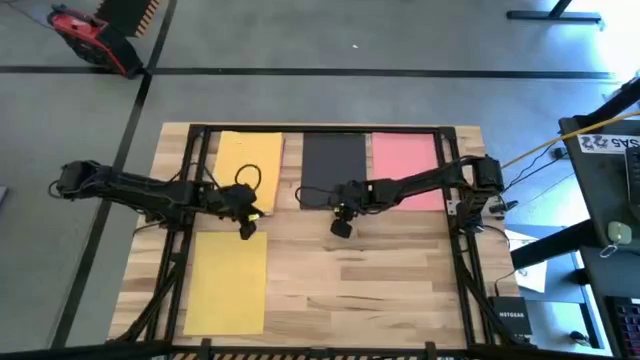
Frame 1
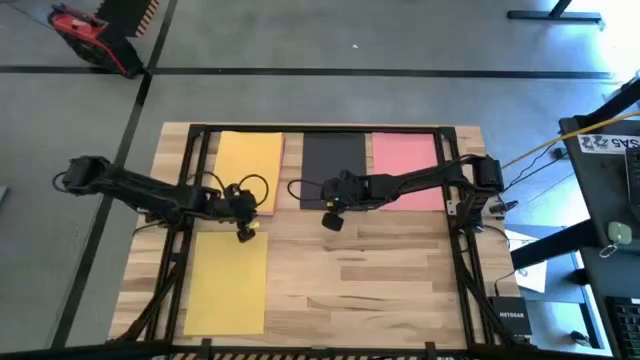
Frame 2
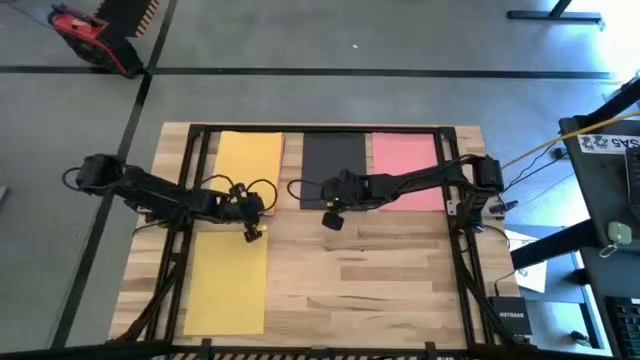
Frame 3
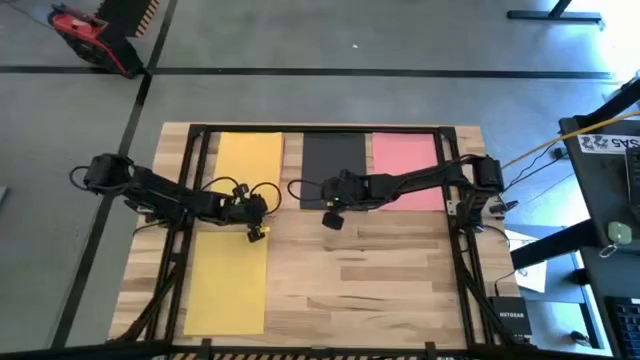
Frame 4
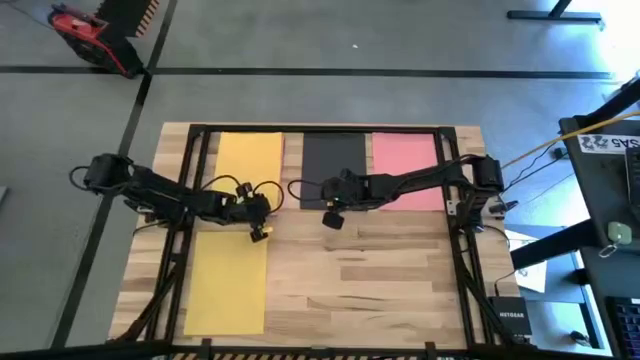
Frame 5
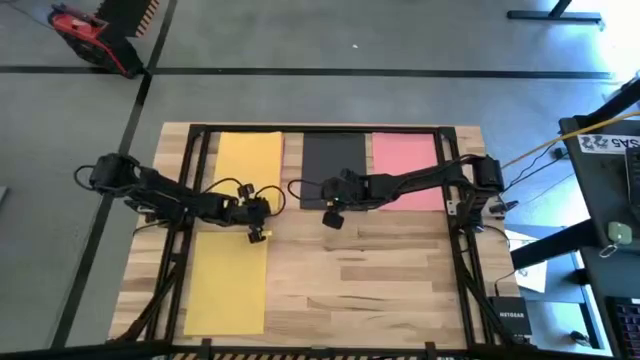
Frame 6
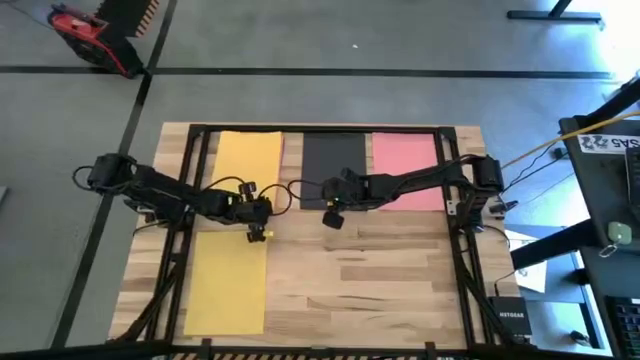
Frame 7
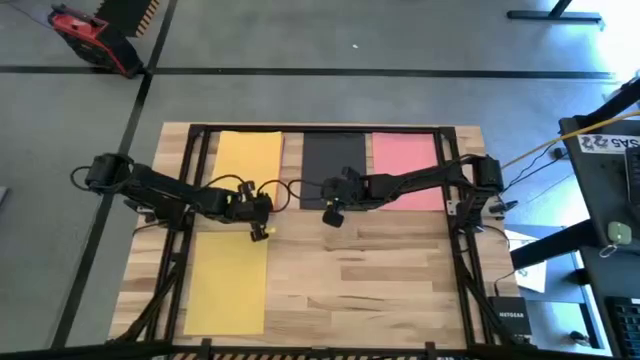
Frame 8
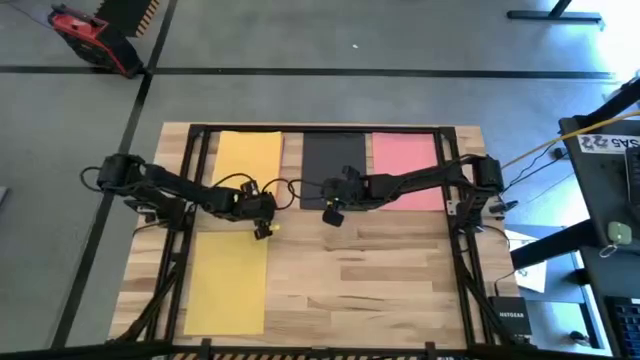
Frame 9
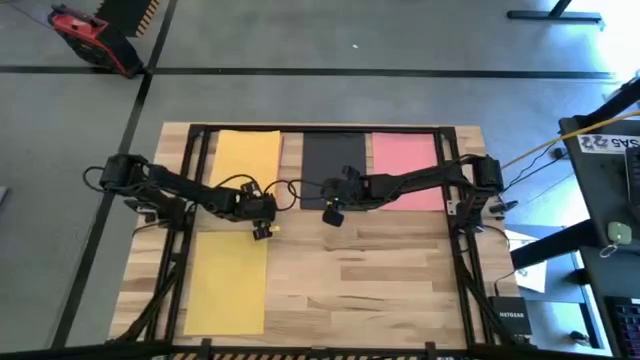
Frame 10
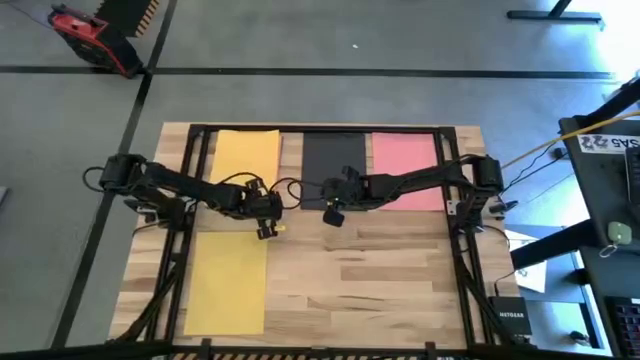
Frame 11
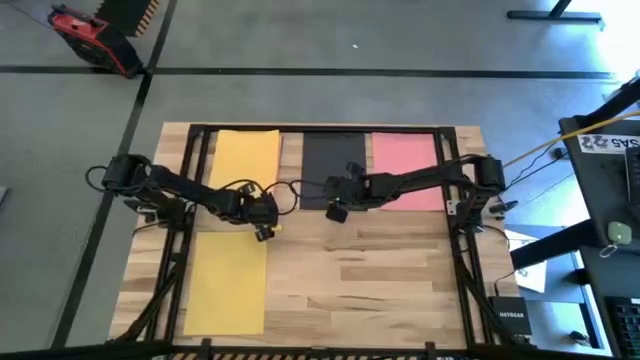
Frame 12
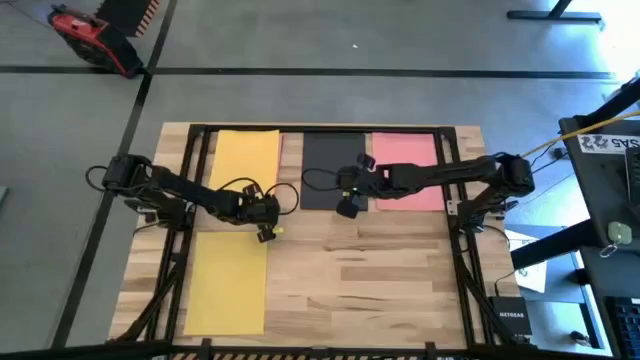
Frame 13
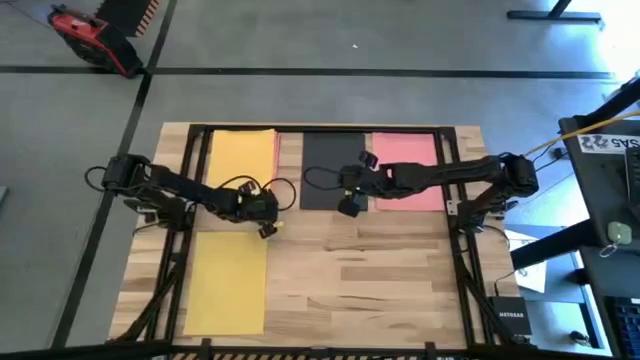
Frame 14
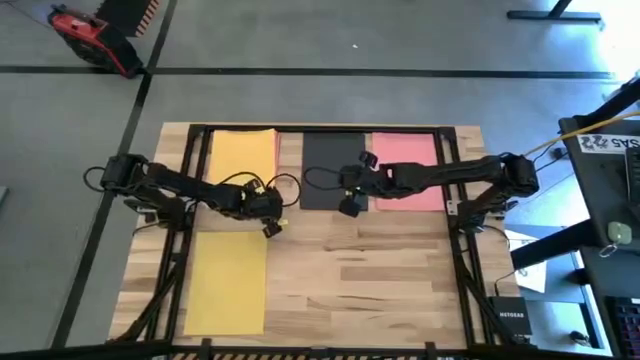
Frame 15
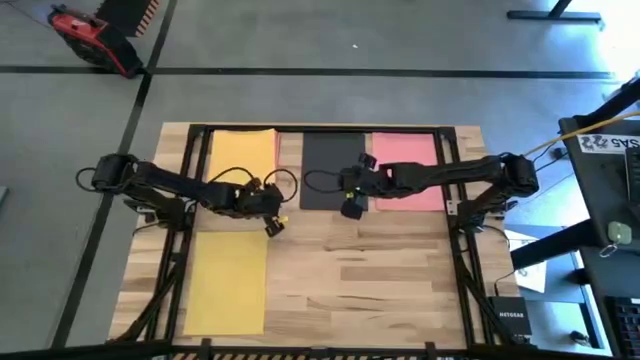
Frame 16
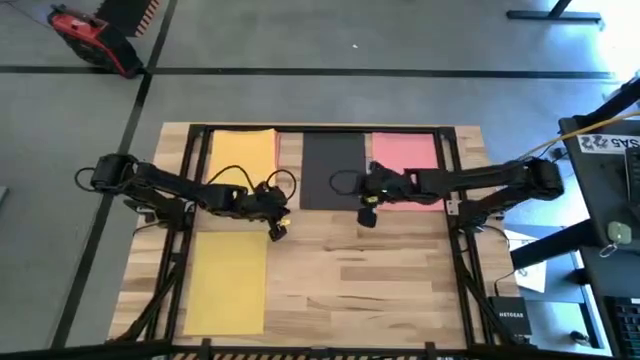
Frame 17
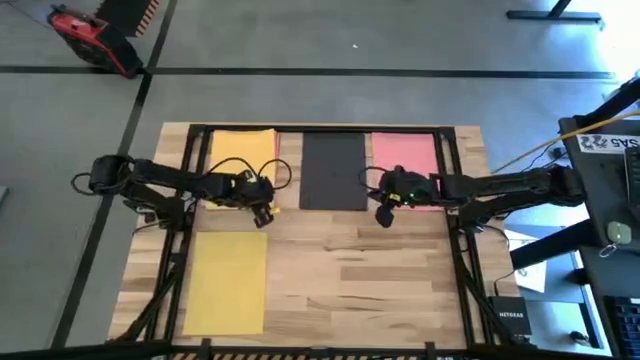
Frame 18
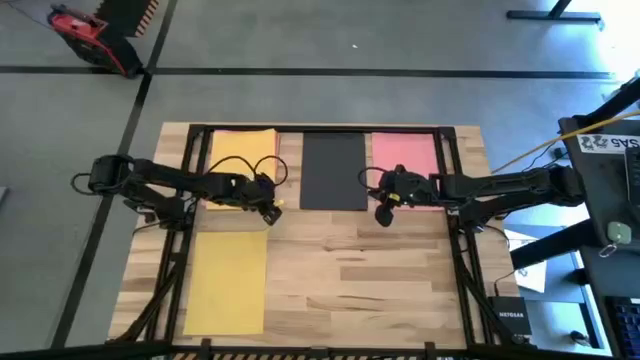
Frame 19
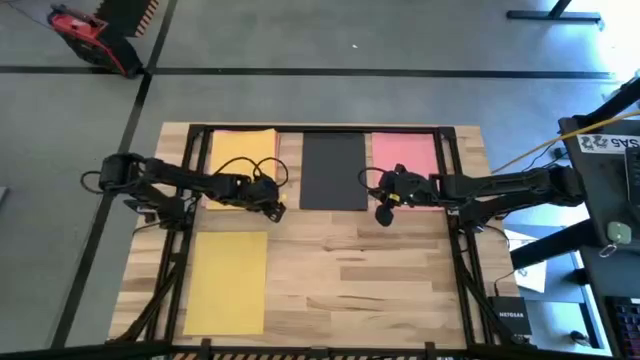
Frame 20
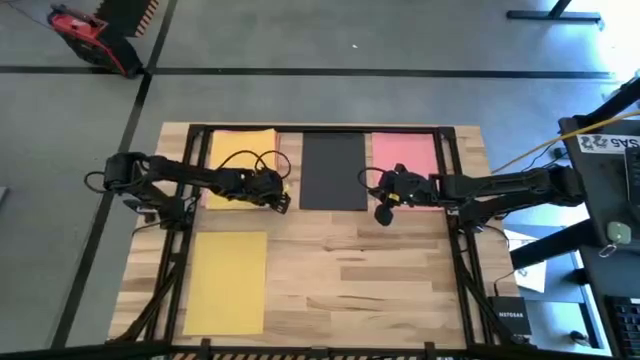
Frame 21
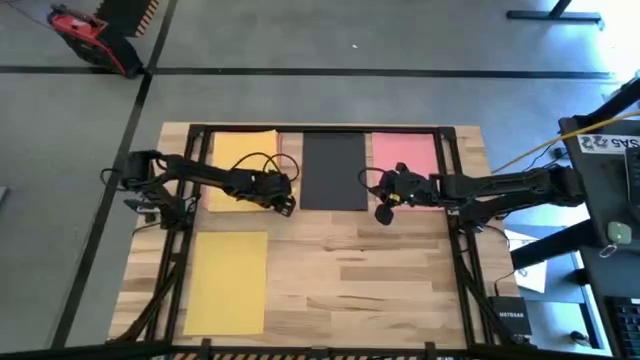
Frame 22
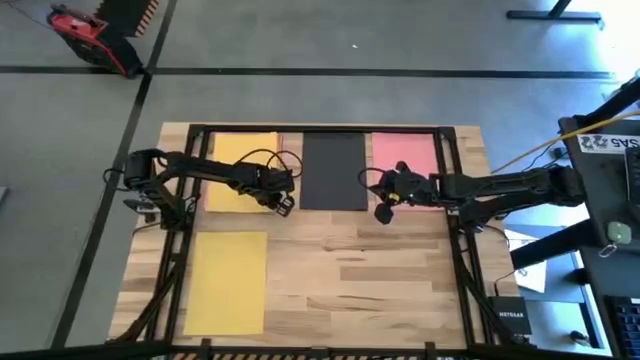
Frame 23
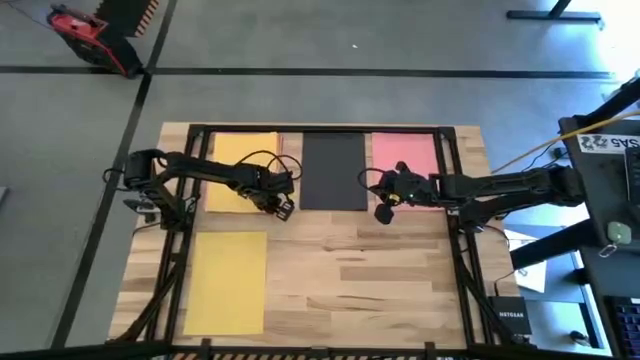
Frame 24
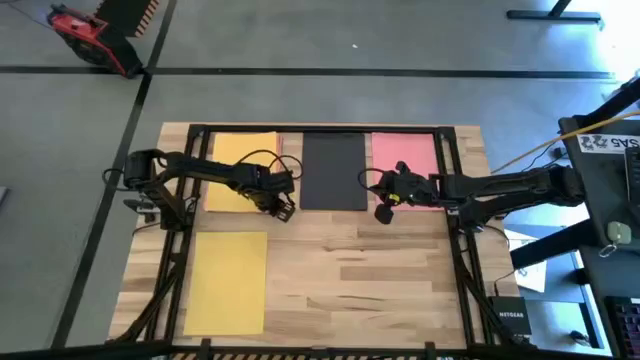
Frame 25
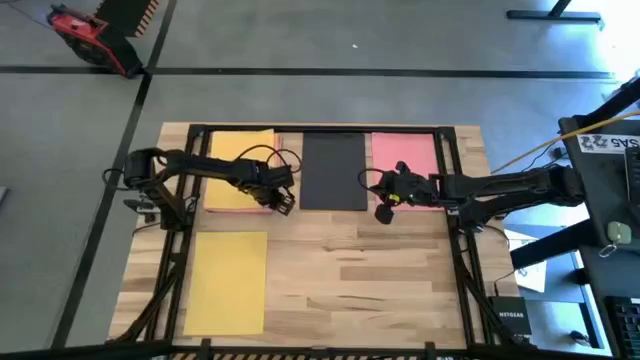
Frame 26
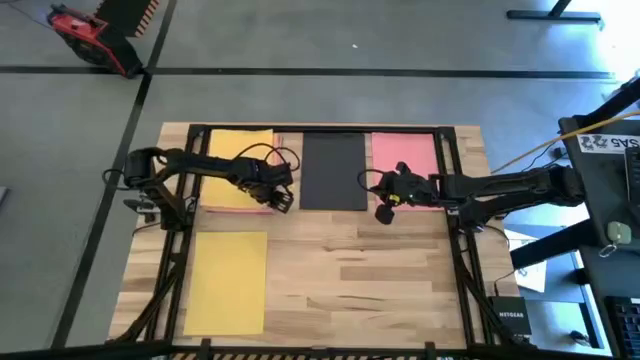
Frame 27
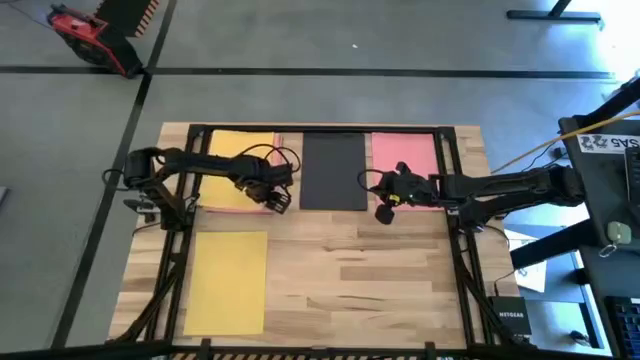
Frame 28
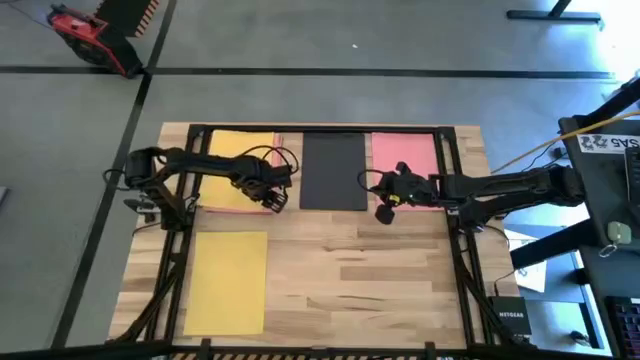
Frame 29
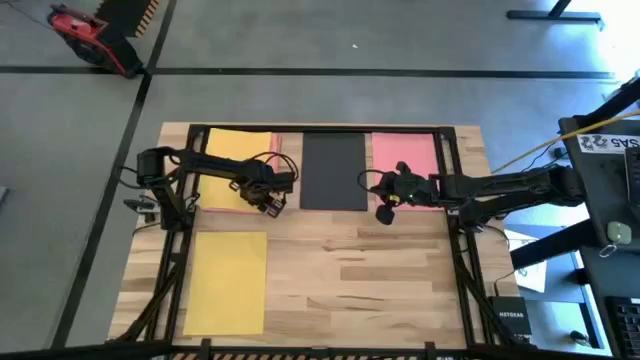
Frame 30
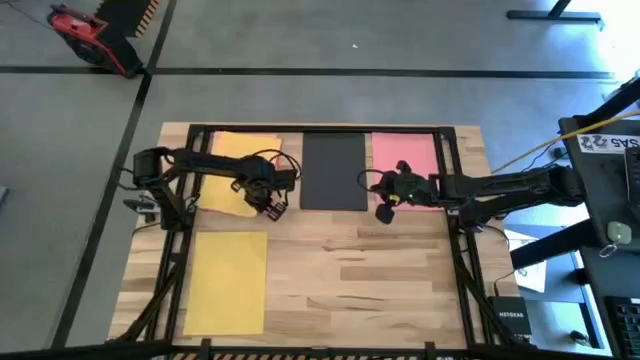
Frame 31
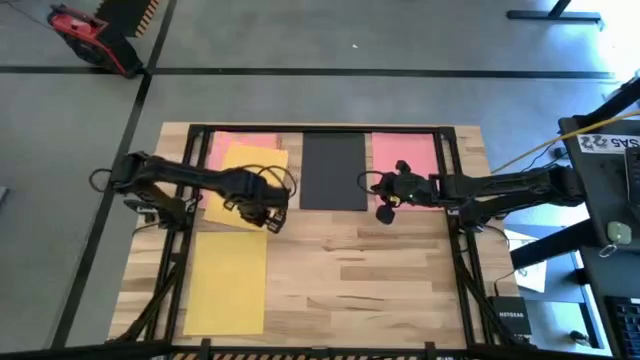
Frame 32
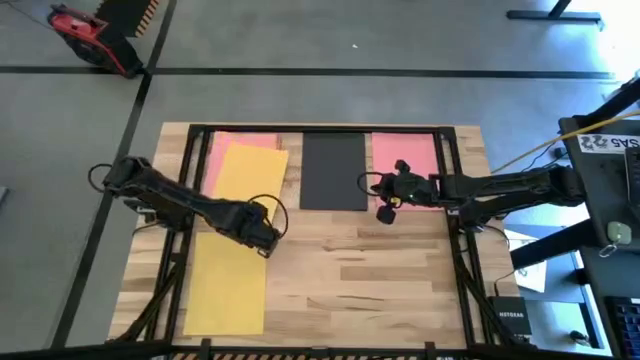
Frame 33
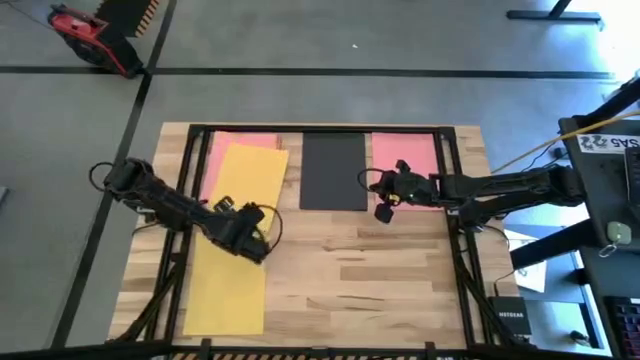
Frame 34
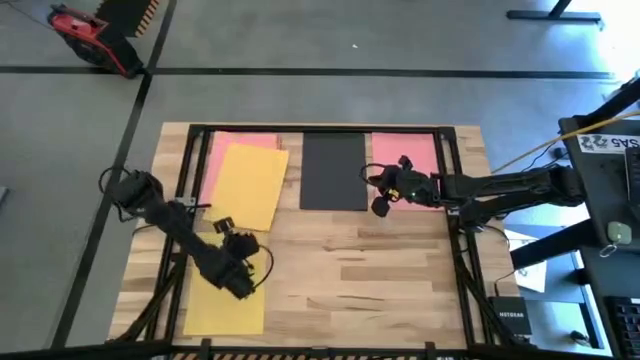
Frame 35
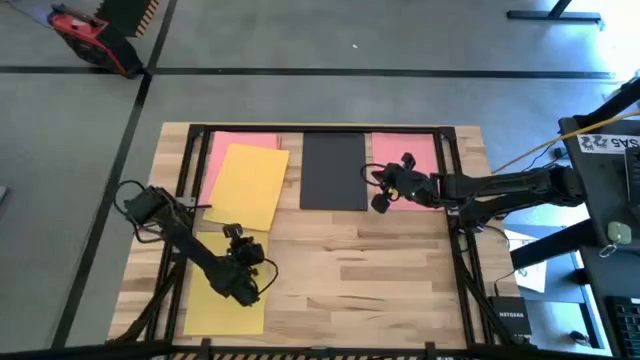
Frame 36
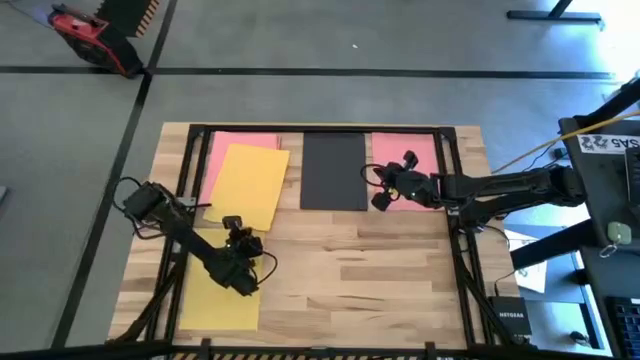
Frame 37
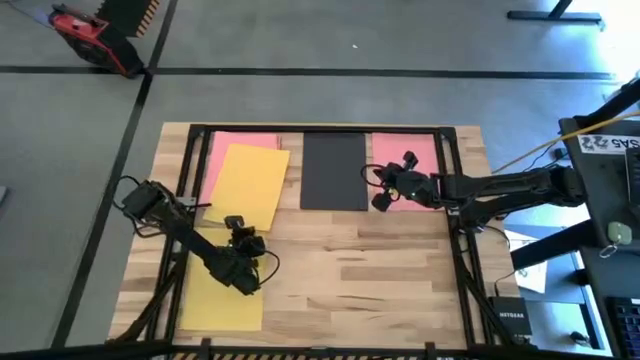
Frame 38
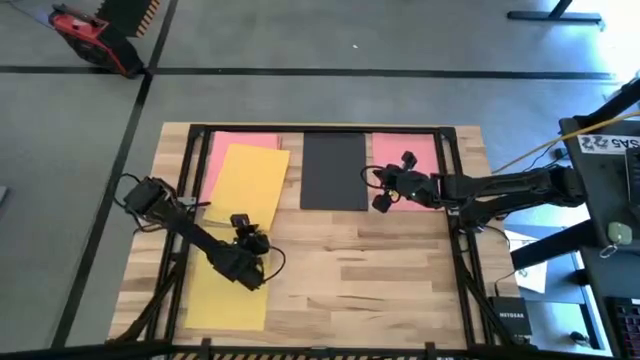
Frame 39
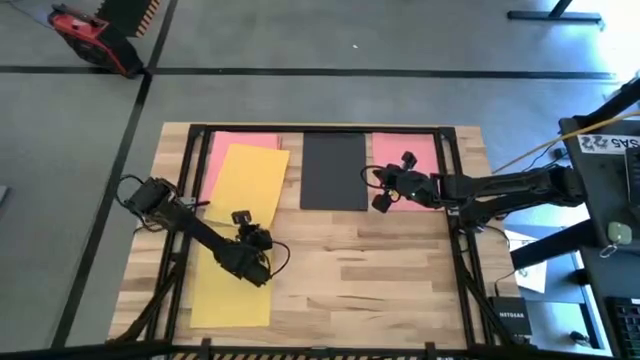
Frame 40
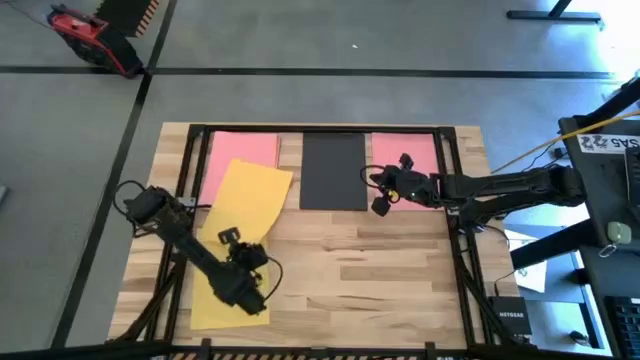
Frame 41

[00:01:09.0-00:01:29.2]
Task: Organize paper
Stack the yellow paper on top of the other yellow paper

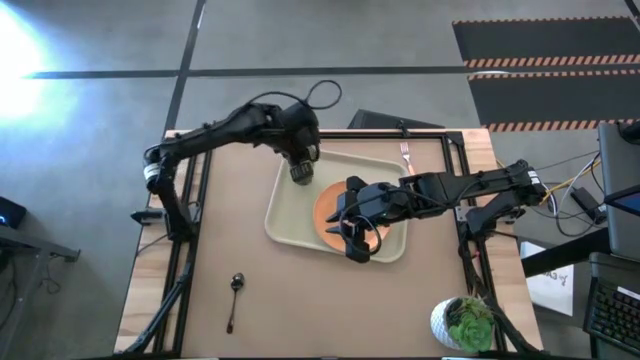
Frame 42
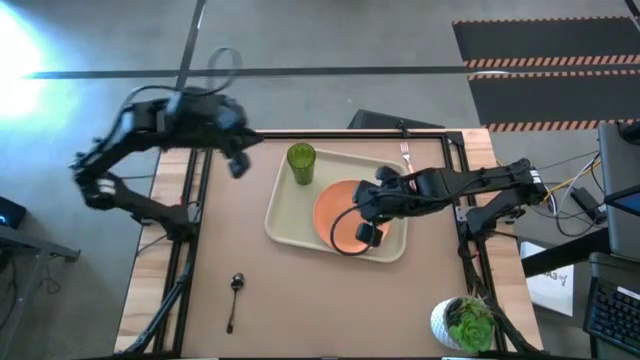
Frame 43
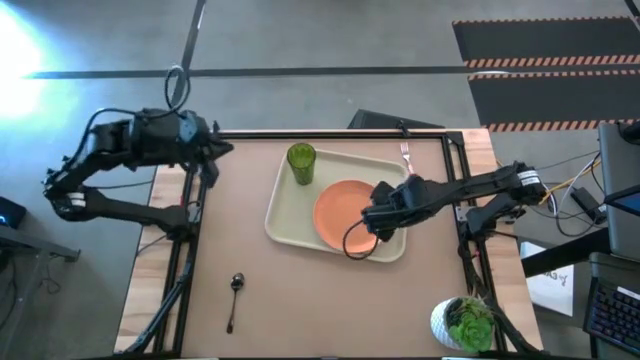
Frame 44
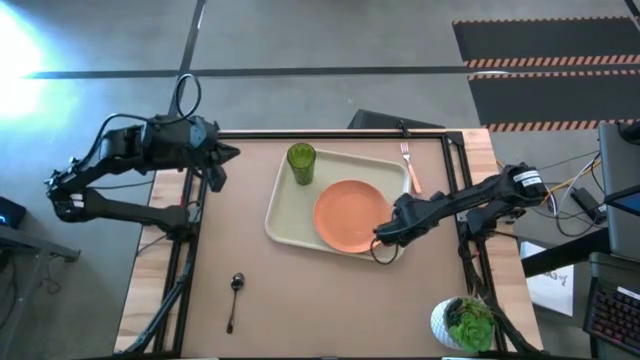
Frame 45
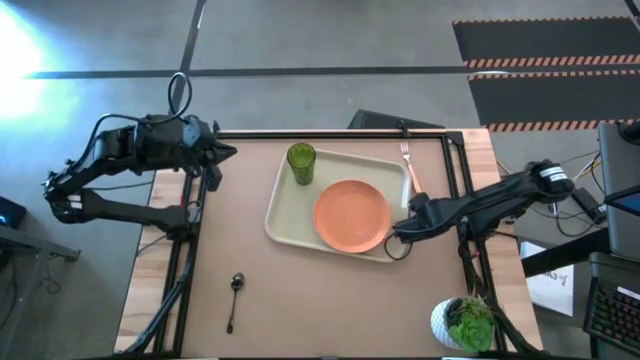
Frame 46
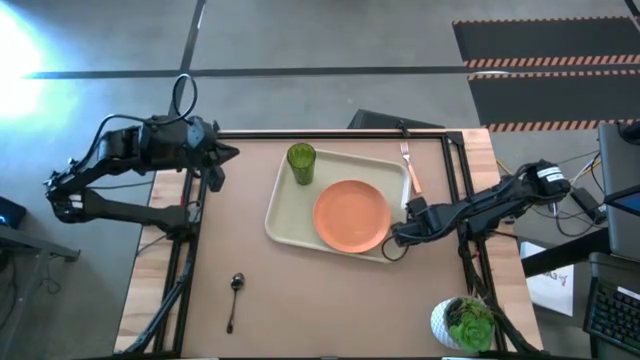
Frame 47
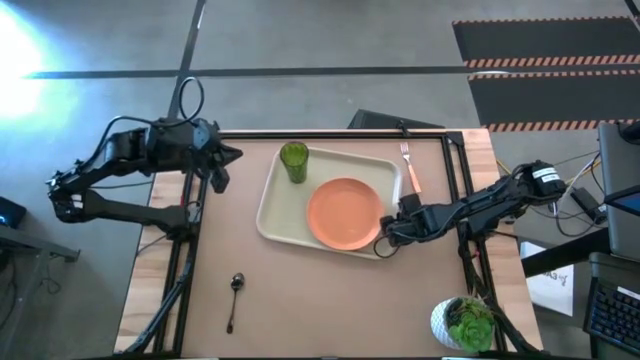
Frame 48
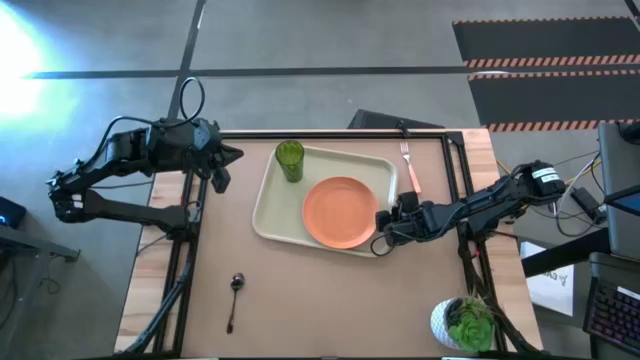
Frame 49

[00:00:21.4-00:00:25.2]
Task: Pick and place plate/cup/fork/spoon on tray
Adjust the light brown serving tray
